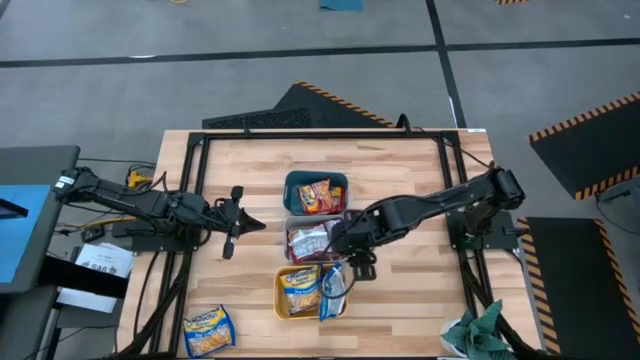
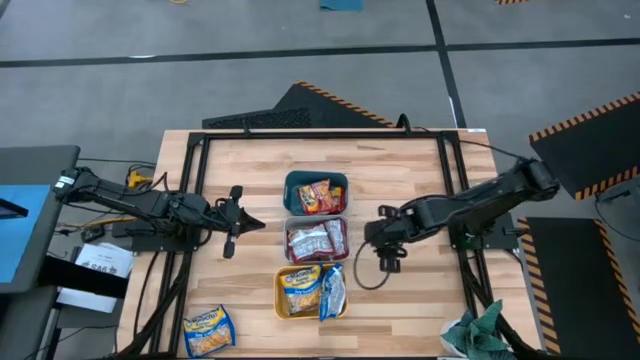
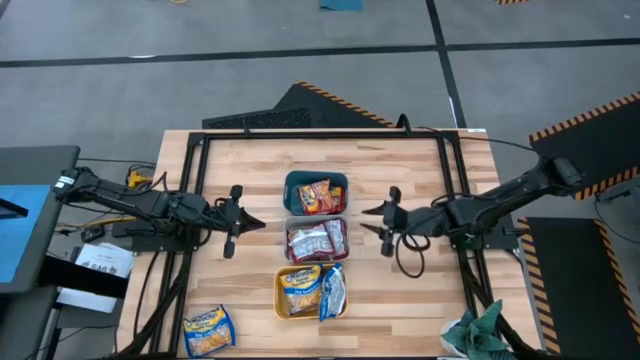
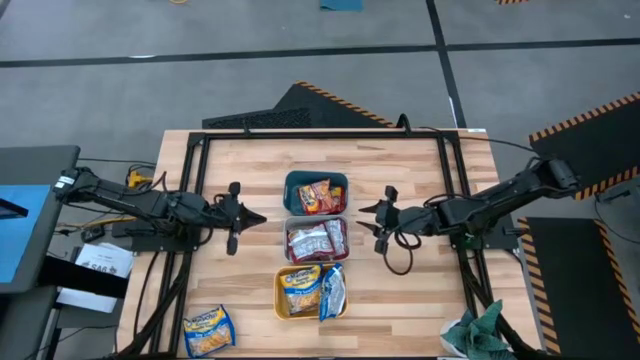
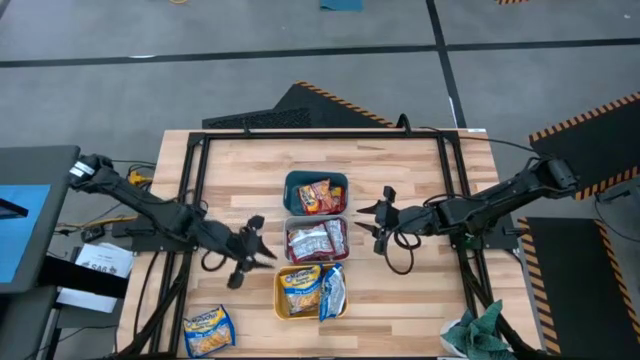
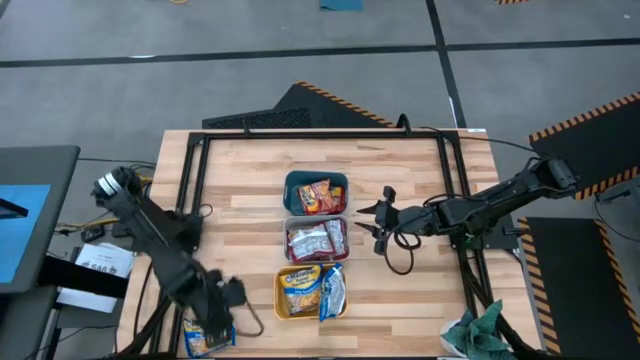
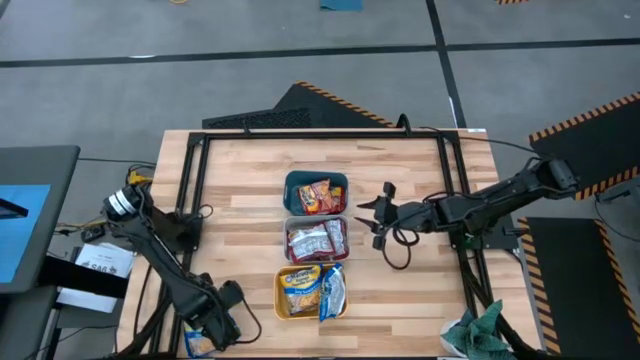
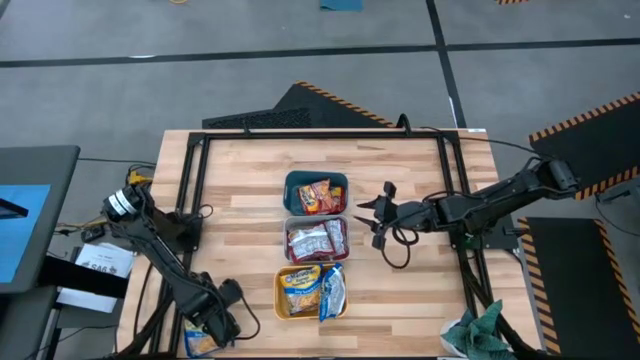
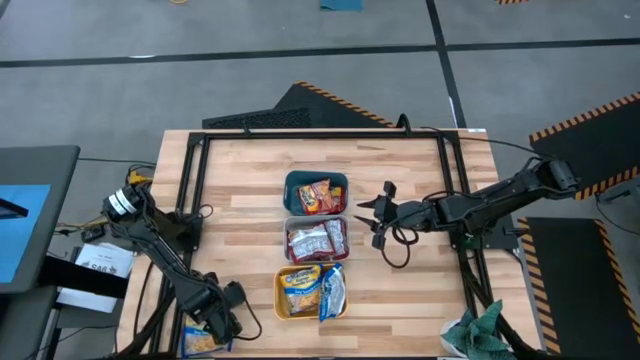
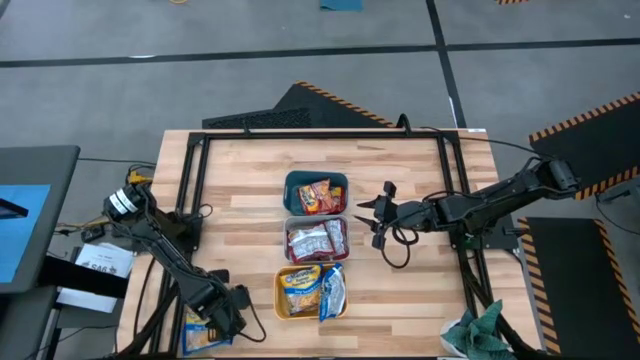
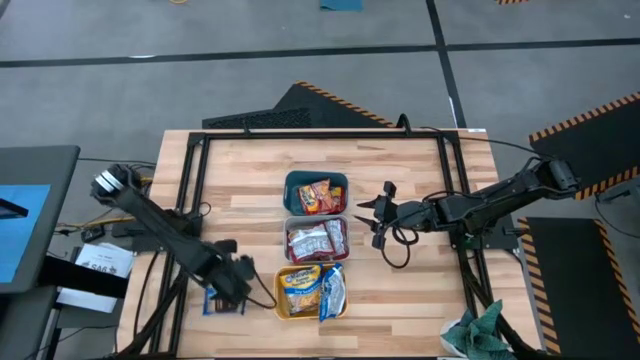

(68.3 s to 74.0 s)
Task: Sort Maruchan noodles
Put the blue noodle pack into the yellow bin

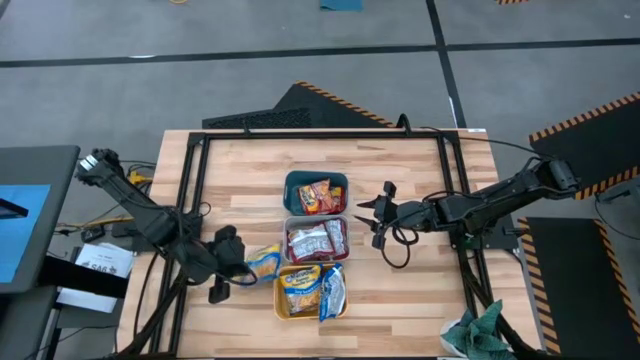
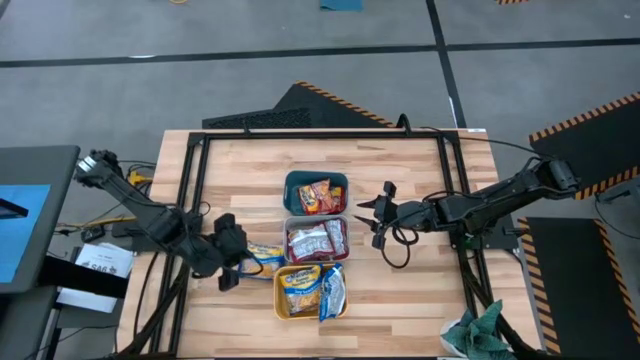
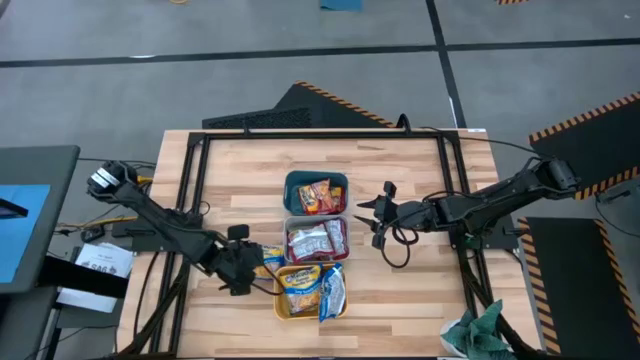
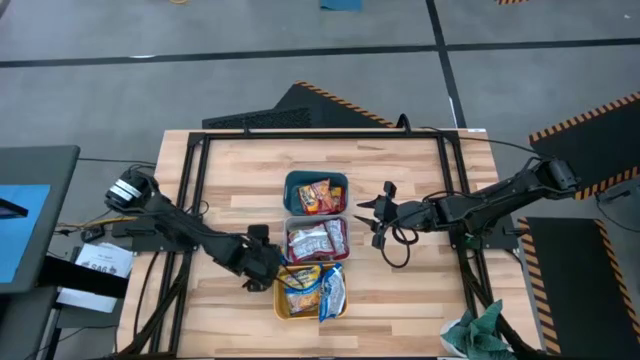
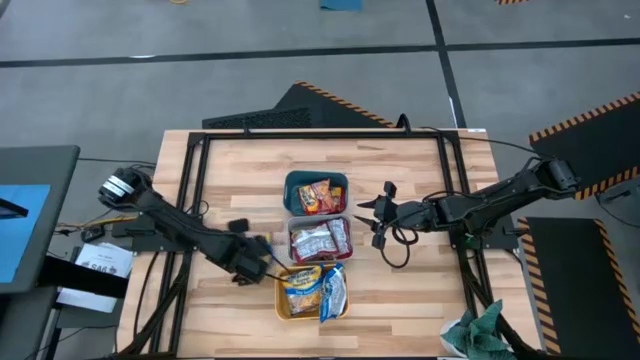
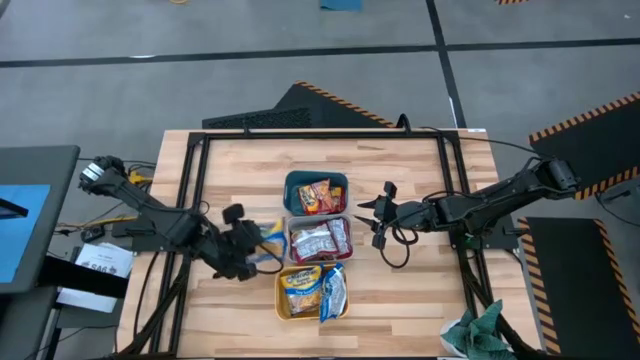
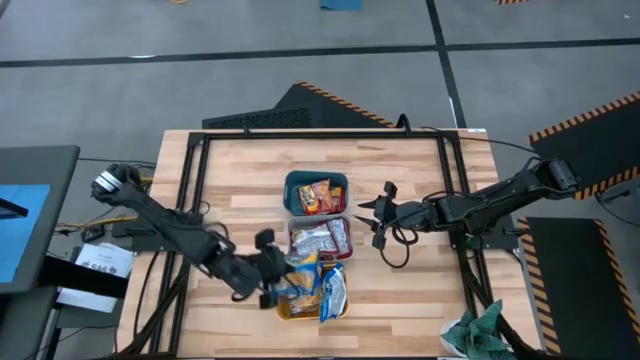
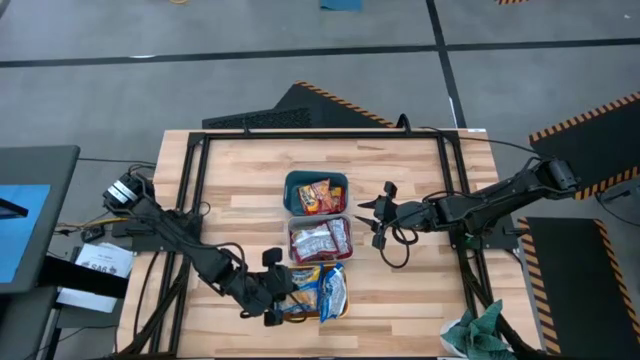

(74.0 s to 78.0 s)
Put the blue noodle pack into the yellow bin

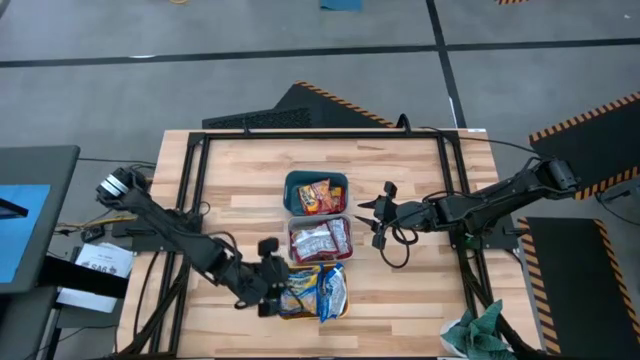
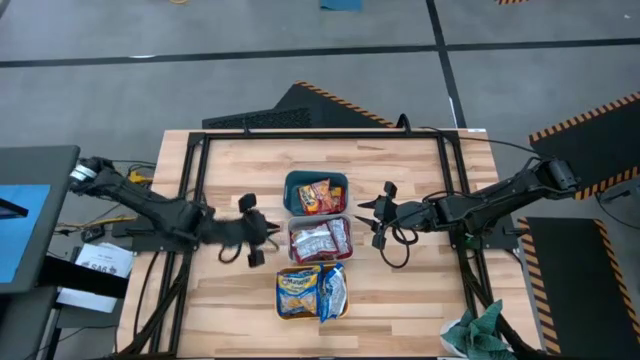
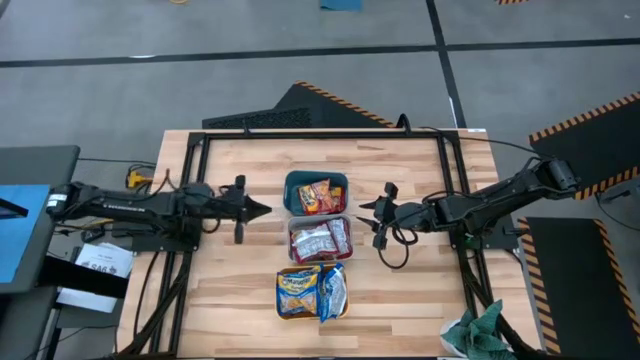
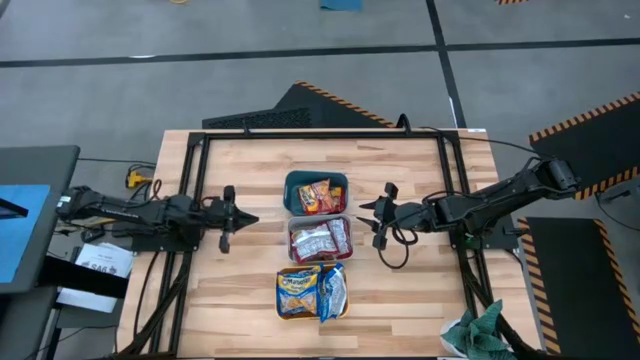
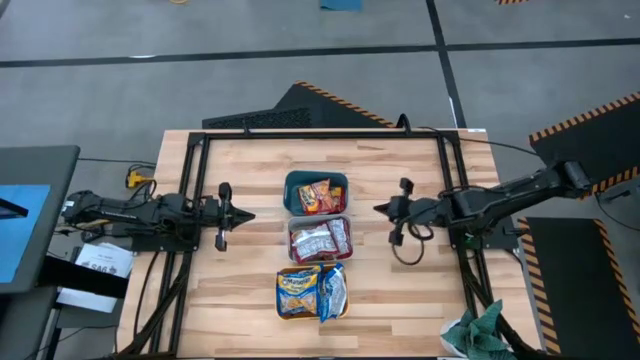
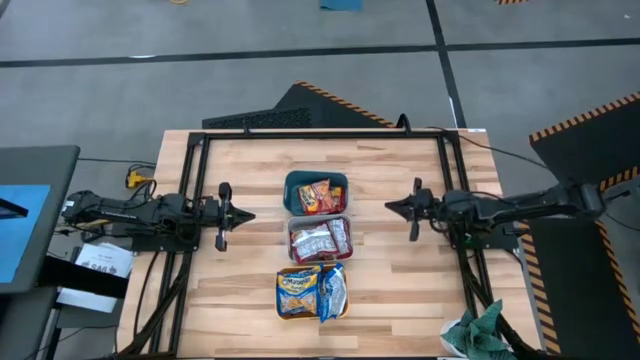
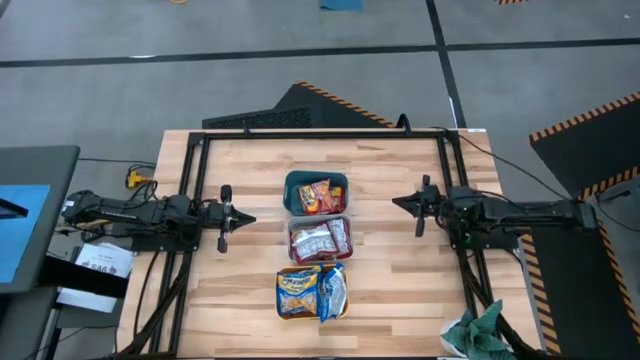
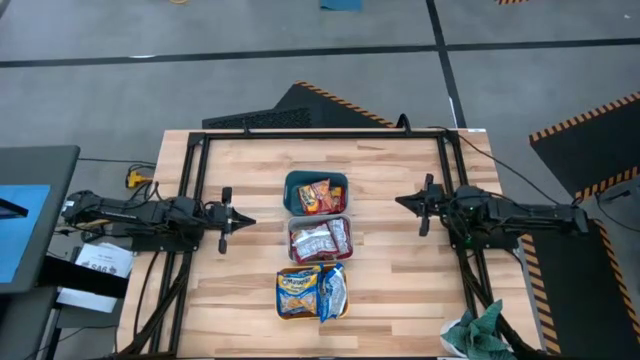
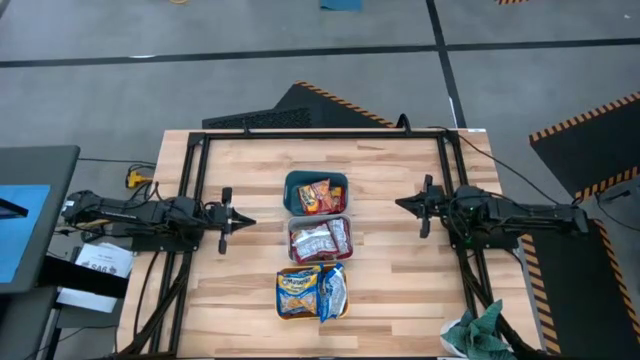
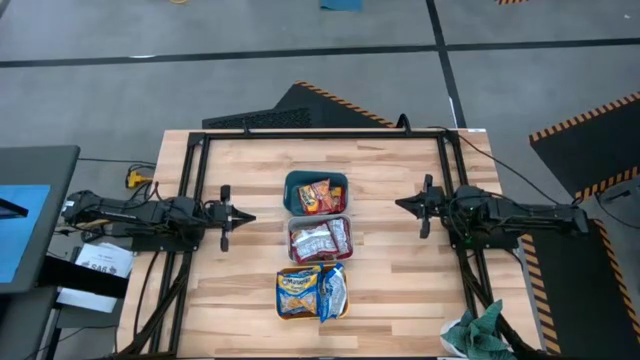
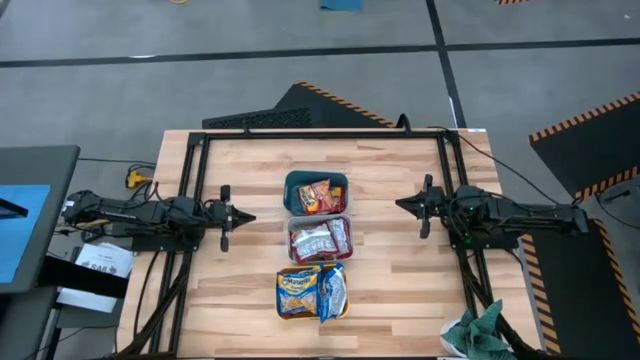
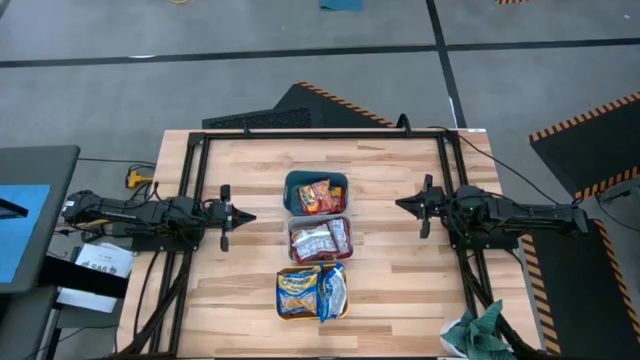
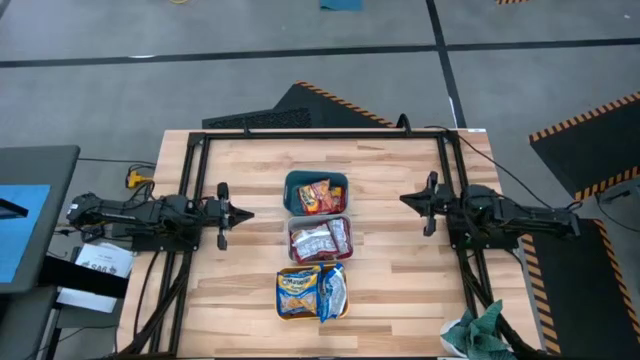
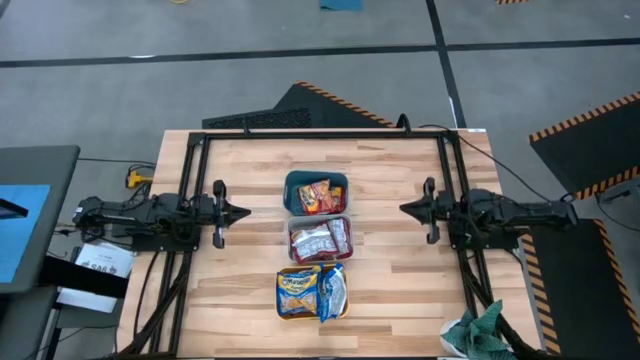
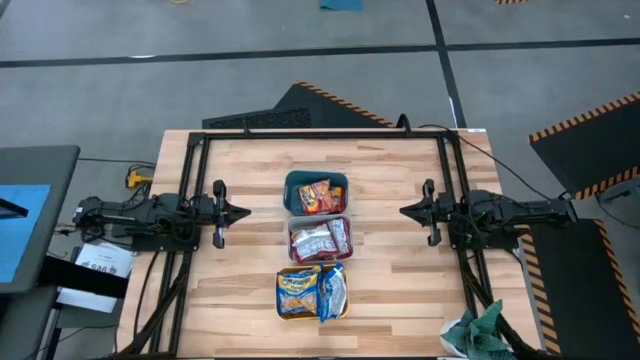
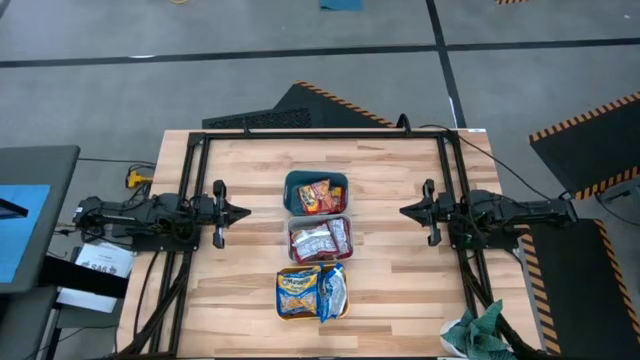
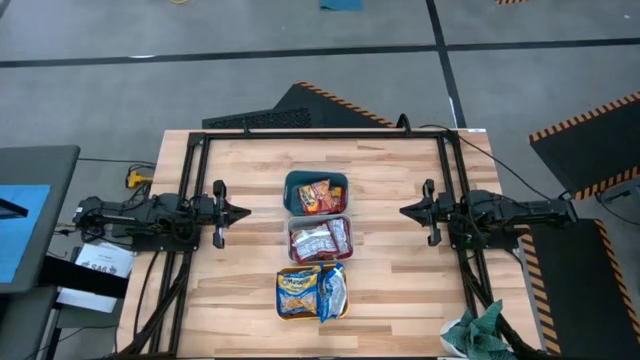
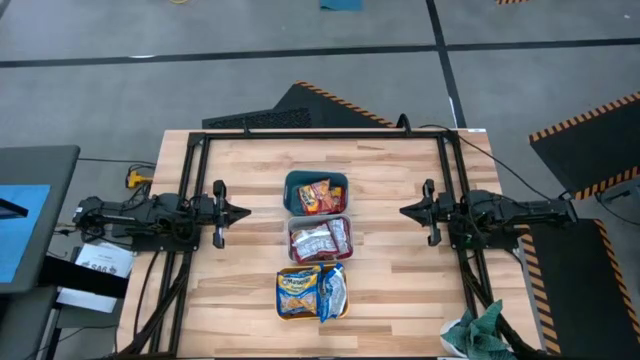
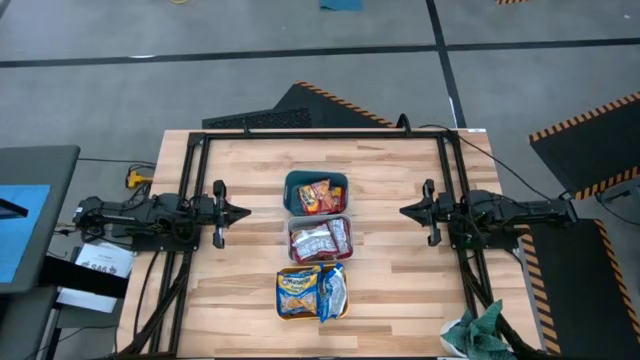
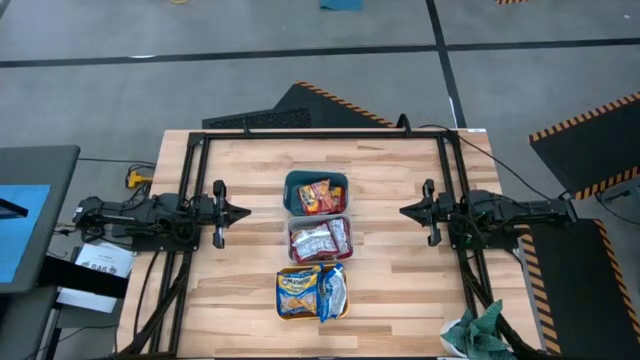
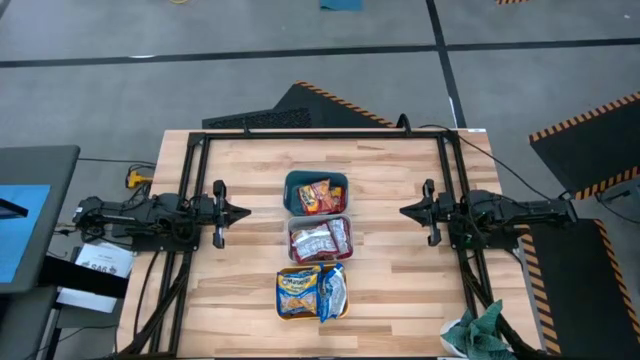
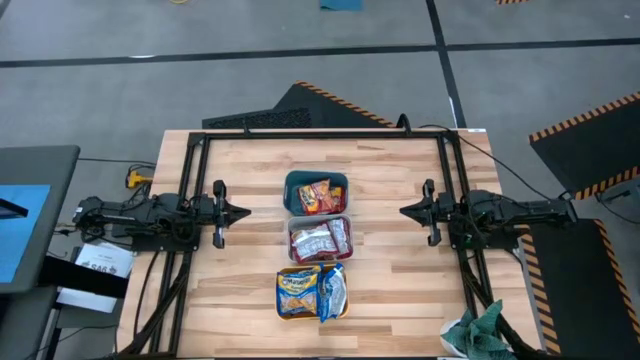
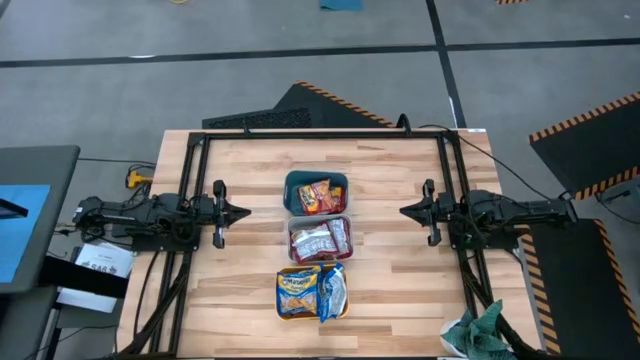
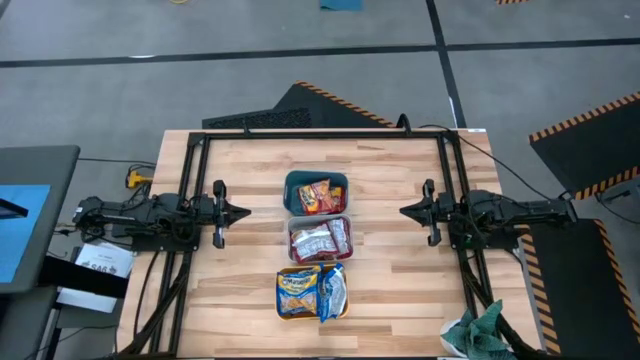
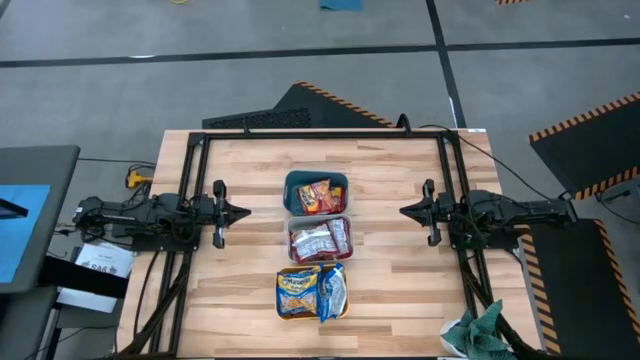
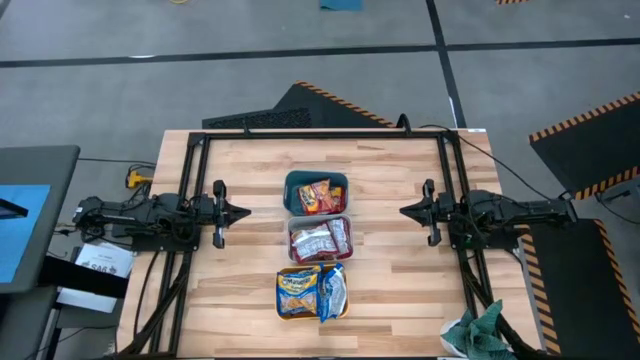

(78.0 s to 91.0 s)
Return to Home Position
